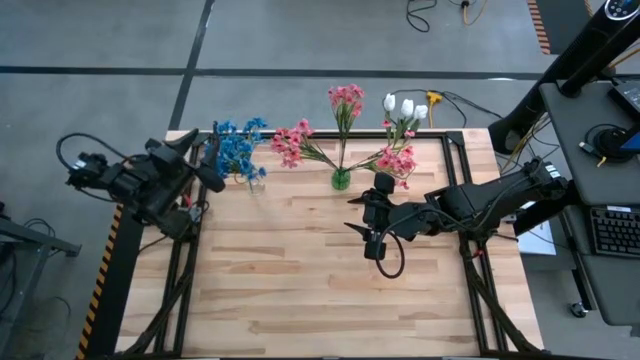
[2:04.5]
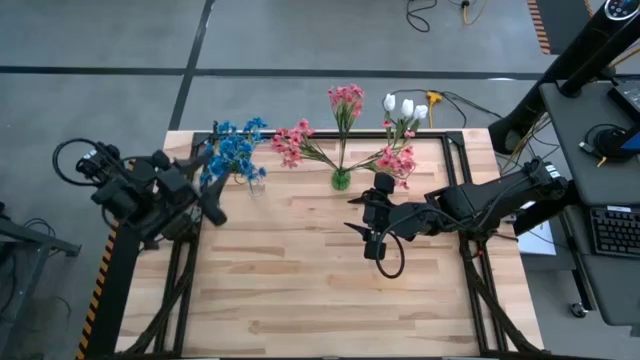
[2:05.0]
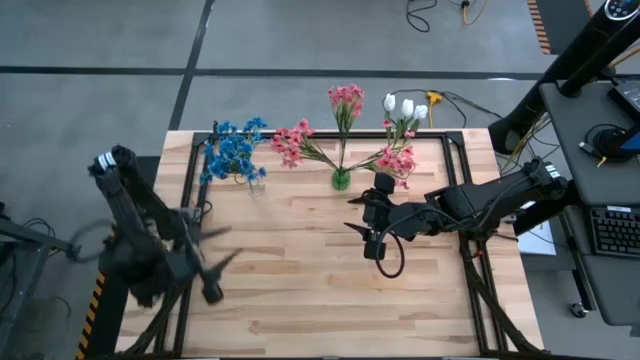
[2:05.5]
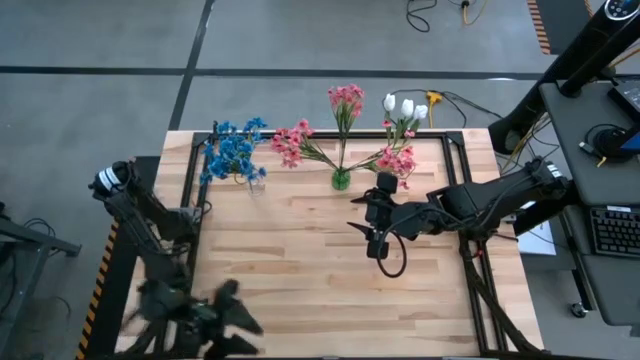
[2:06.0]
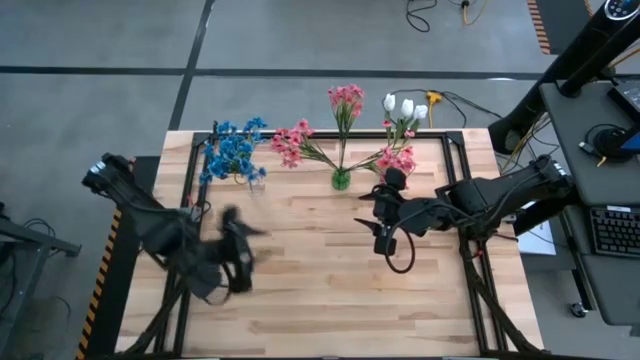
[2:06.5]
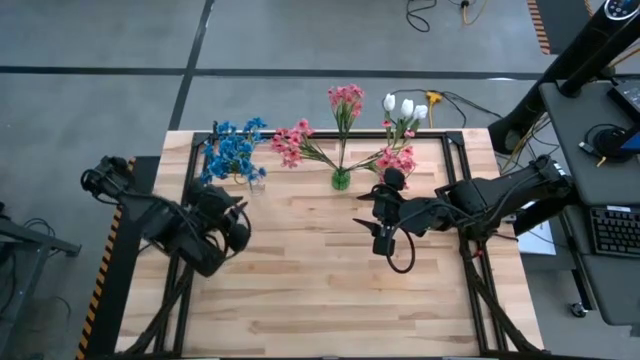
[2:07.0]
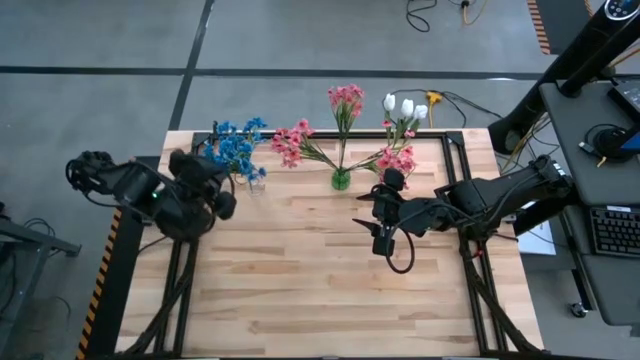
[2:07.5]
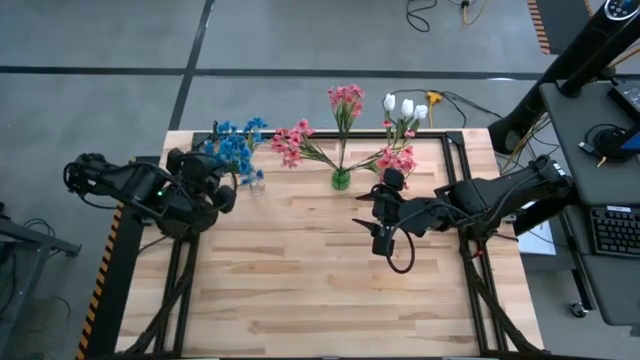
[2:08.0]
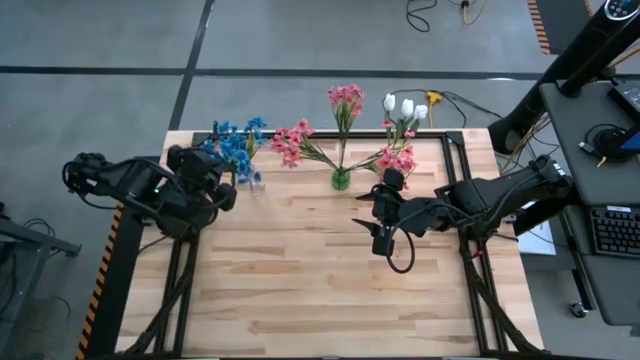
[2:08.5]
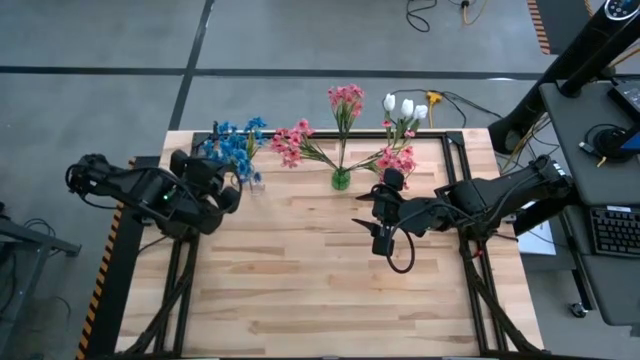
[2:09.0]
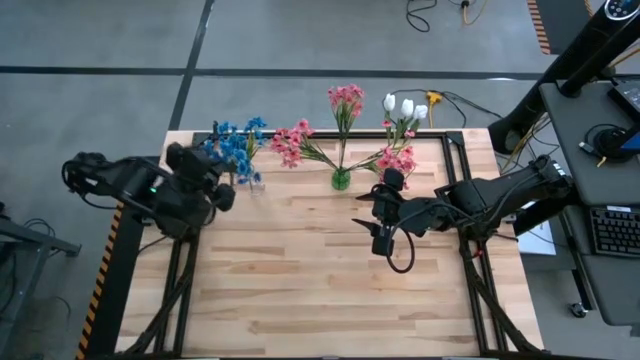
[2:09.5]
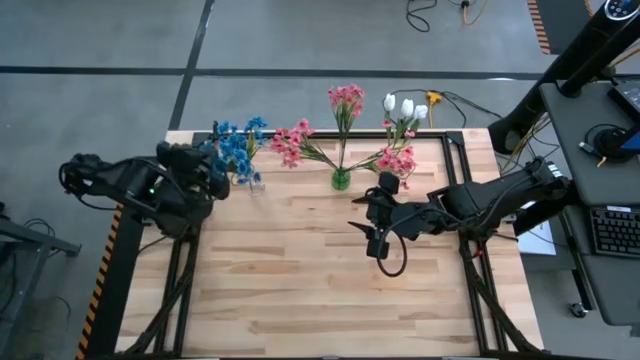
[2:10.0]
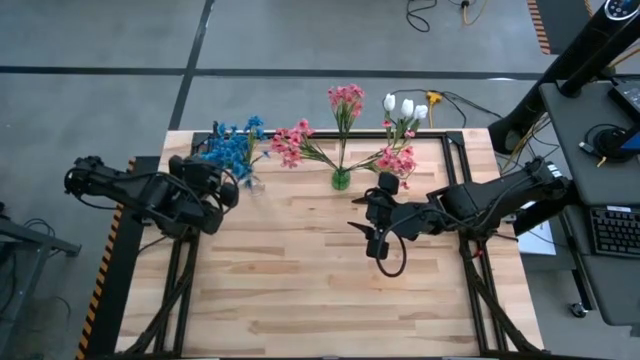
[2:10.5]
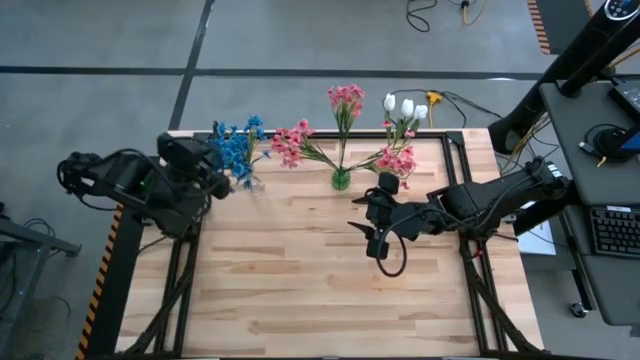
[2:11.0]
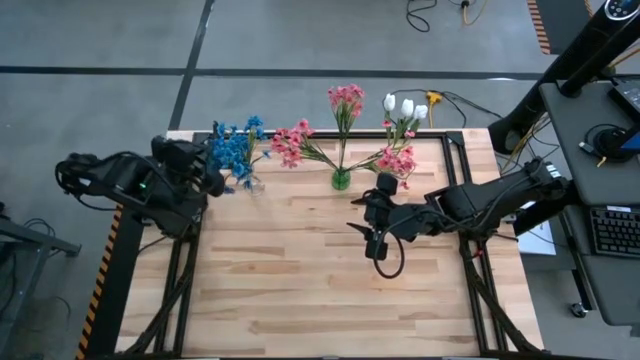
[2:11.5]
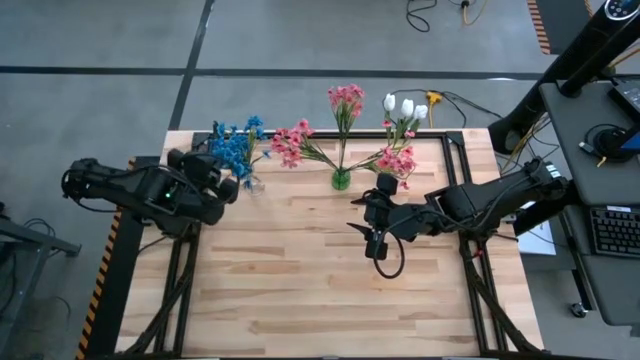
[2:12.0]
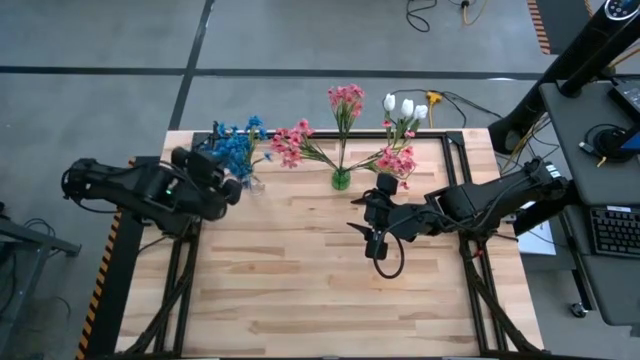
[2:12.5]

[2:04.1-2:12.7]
Task: Sort flowers into vase by color
Adjust the blue flowers on the left transparent vase

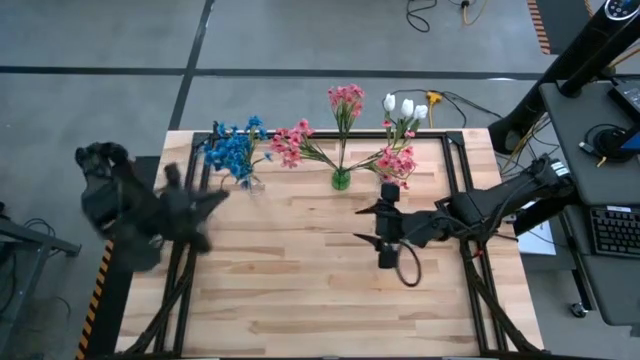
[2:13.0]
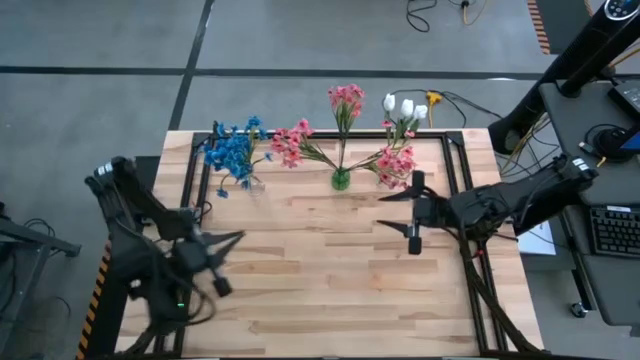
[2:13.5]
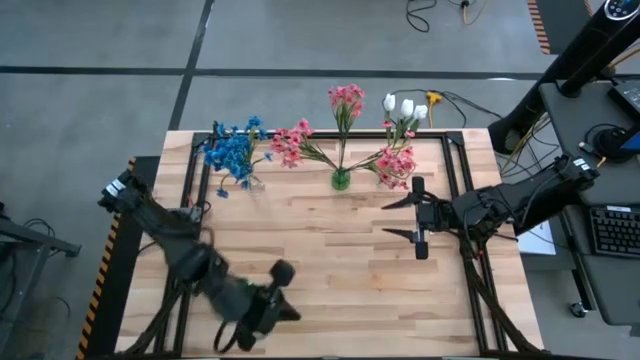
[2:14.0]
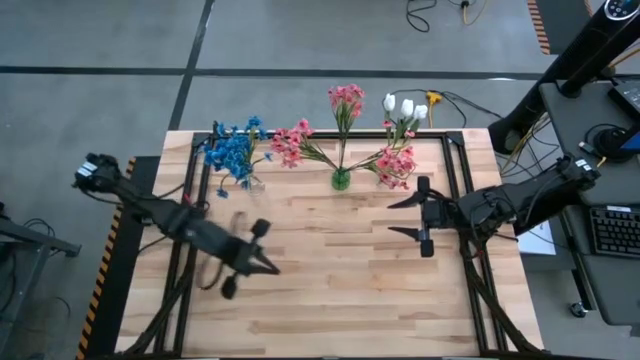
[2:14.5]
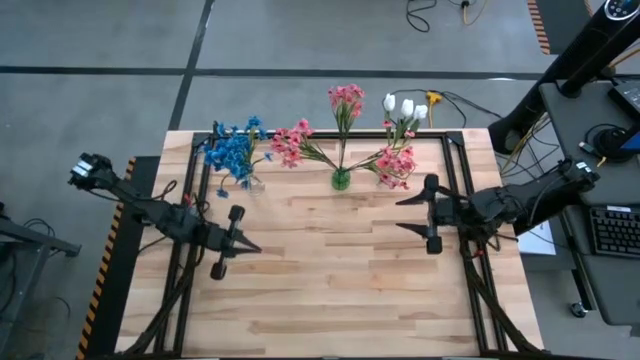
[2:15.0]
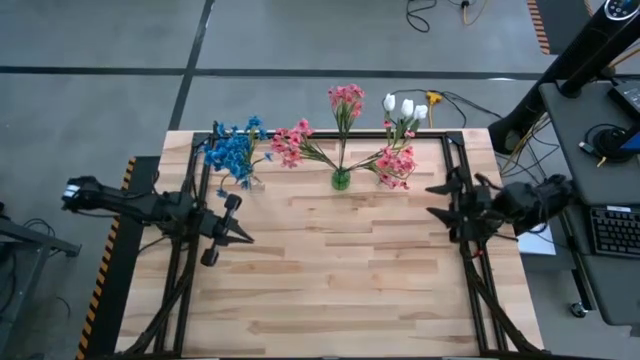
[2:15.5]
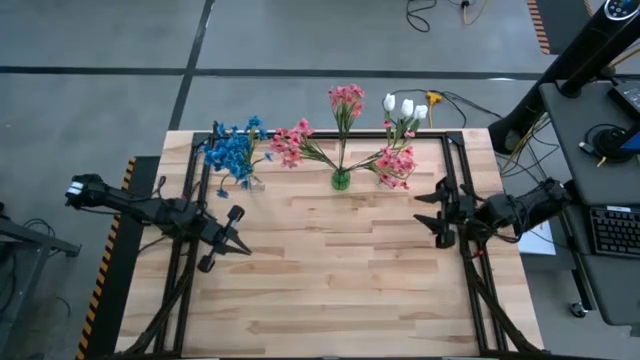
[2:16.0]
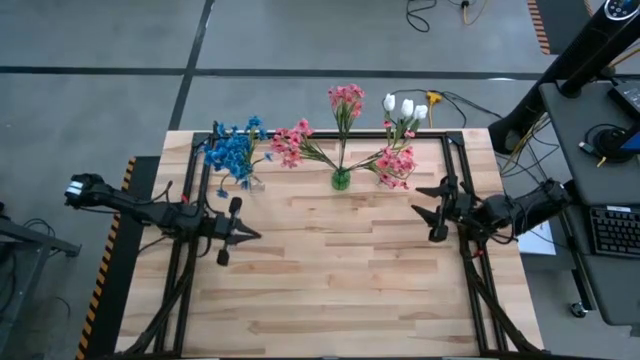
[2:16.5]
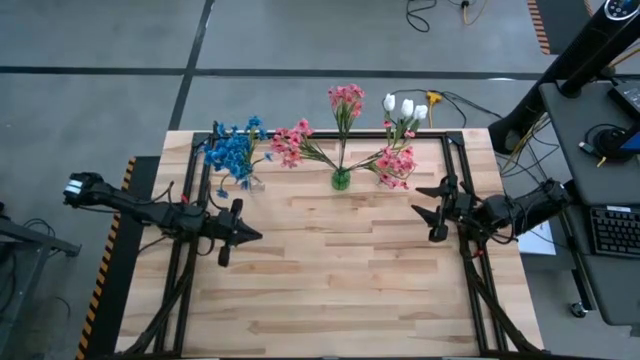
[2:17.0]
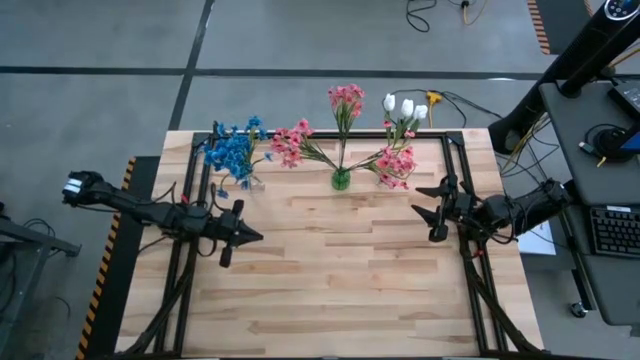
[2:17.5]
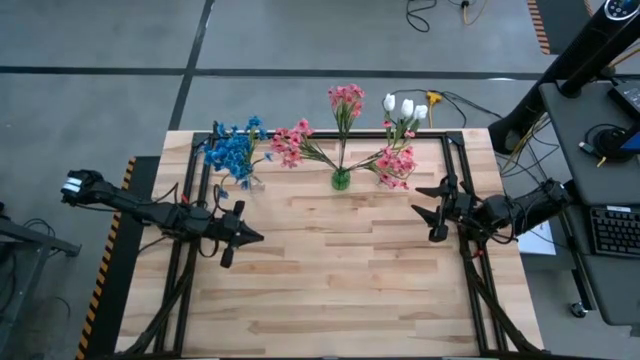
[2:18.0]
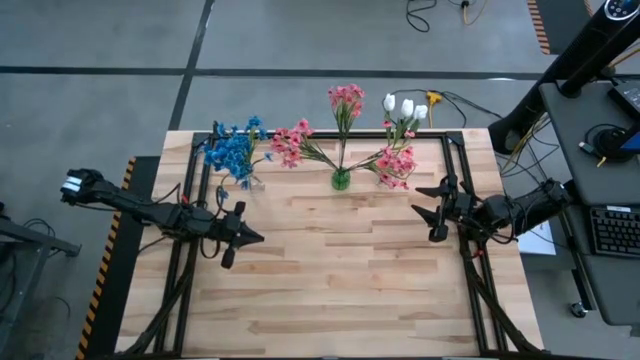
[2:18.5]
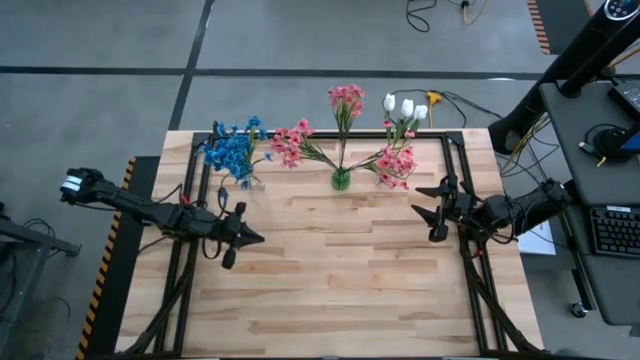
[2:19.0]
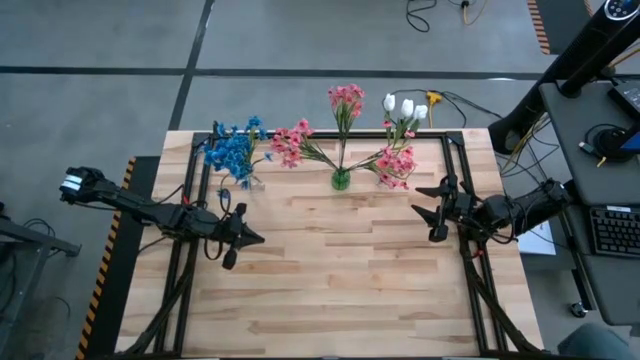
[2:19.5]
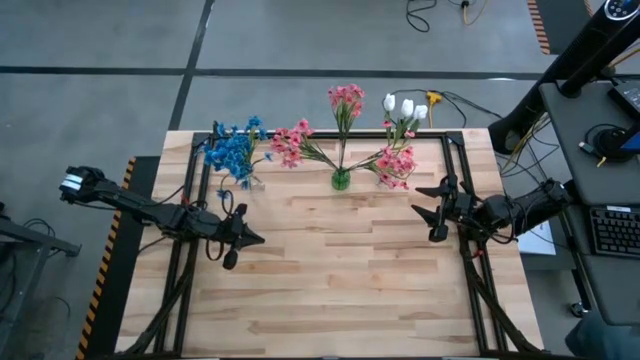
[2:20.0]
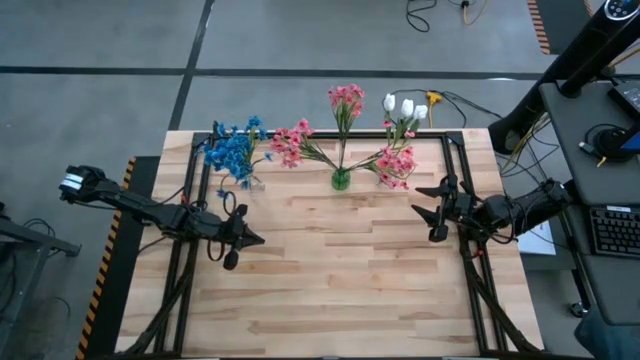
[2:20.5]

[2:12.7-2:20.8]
Return to Home Position

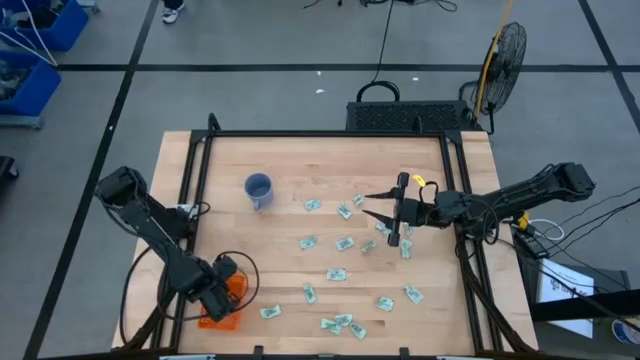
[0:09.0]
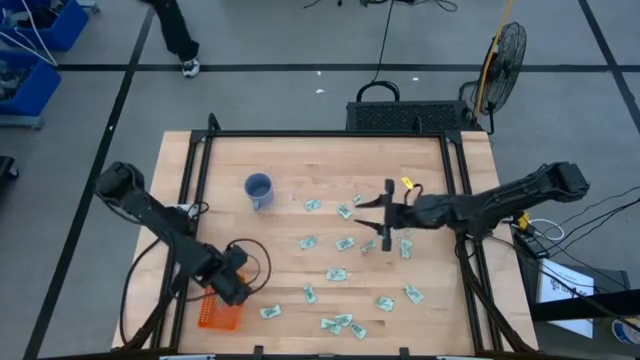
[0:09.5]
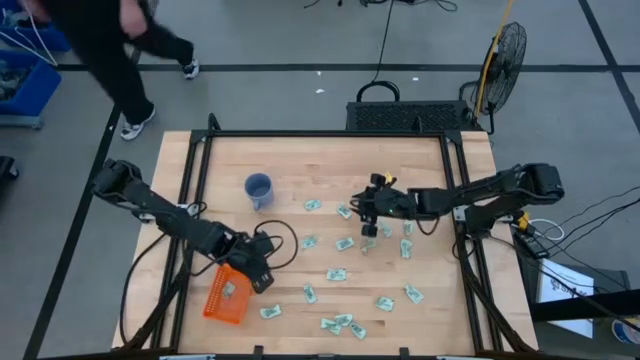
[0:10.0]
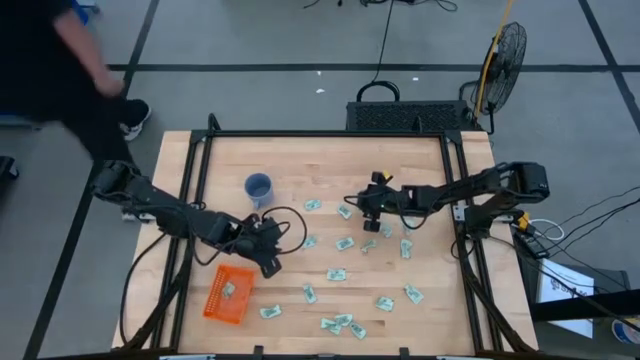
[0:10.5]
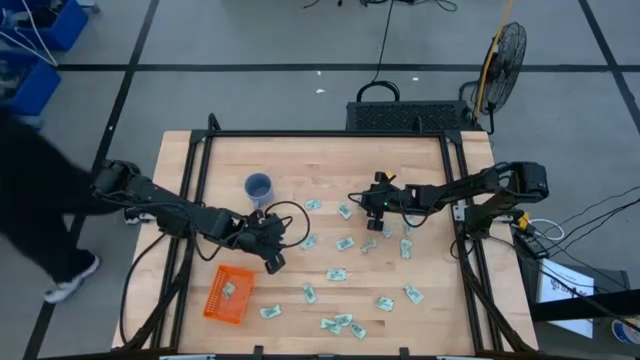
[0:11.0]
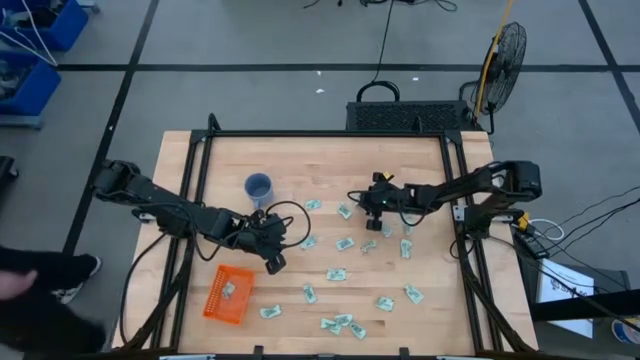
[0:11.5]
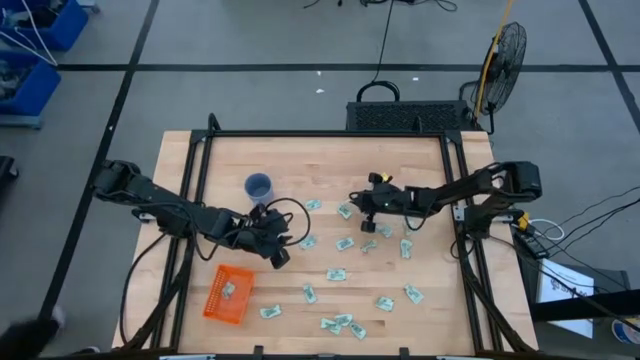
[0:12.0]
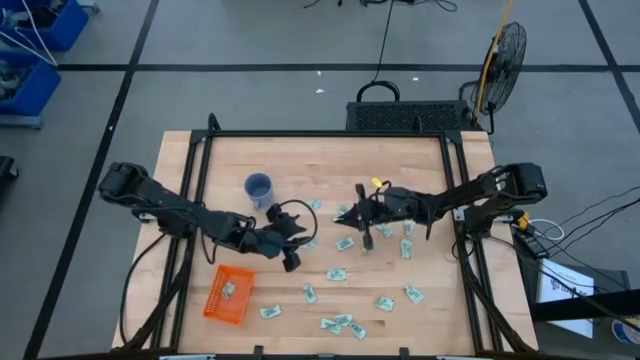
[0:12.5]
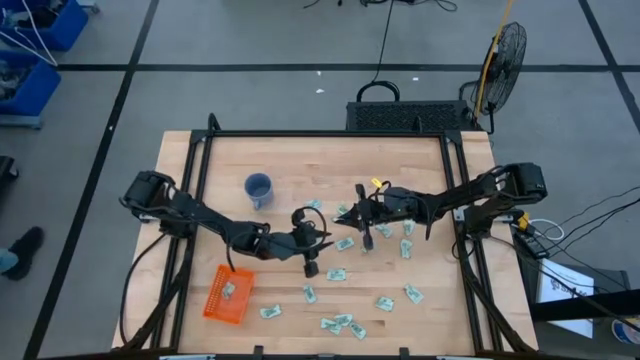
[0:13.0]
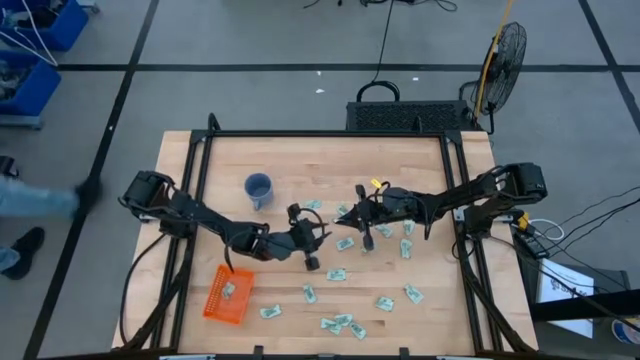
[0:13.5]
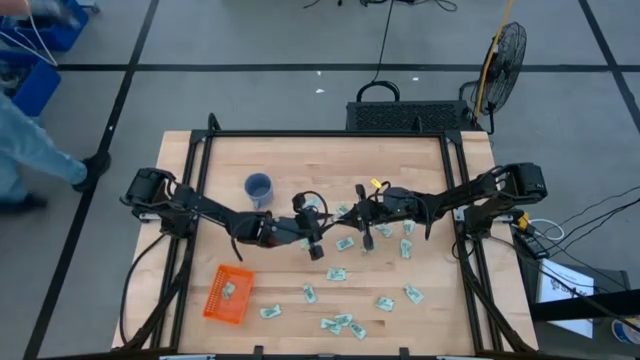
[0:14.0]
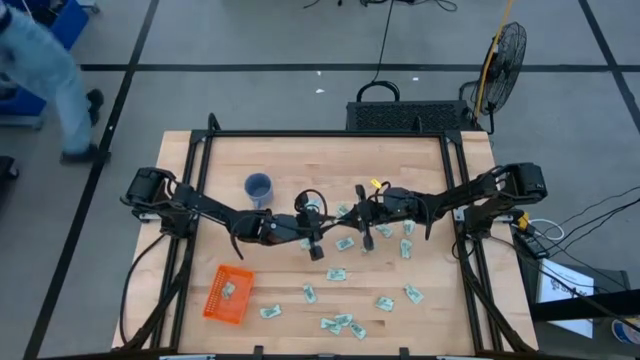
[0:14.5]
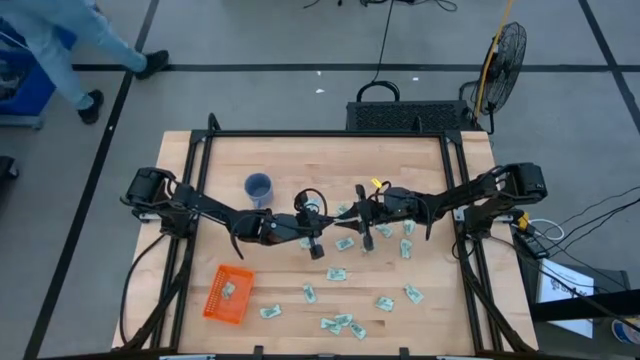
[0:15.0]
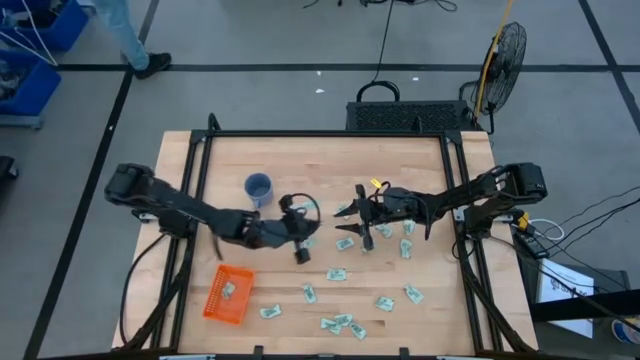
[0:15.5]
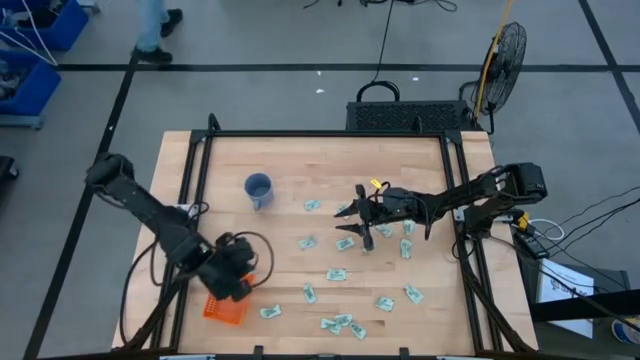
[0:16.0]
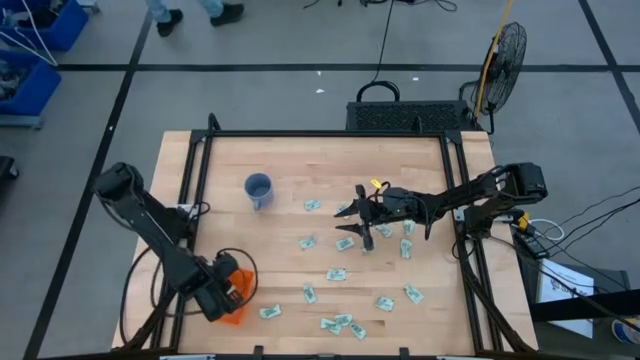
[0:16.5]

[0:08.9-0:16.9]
Task: Pick and place Stevia / Truvia into bins
Put the stevia packet into the orange bin
